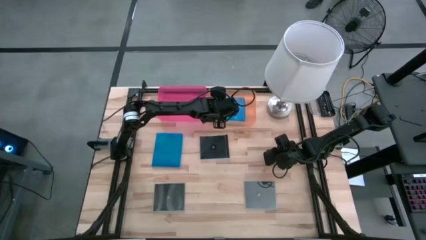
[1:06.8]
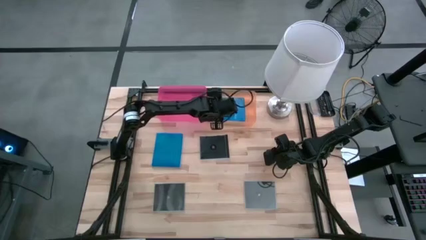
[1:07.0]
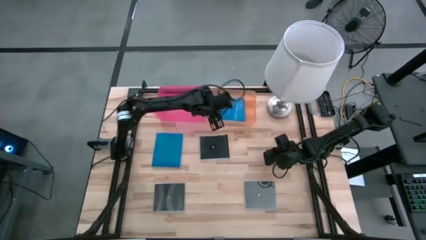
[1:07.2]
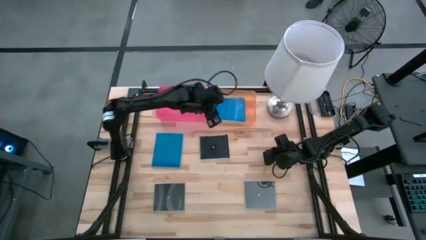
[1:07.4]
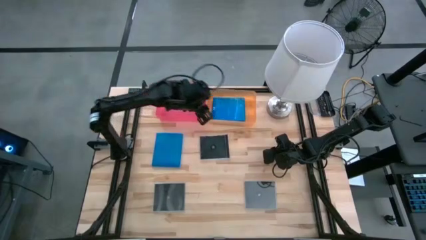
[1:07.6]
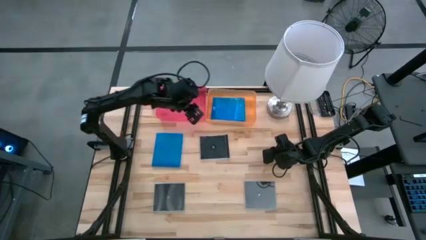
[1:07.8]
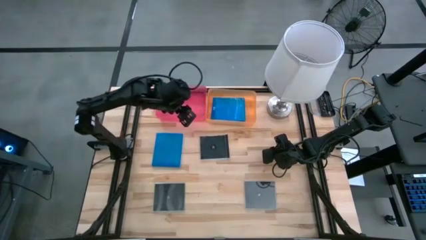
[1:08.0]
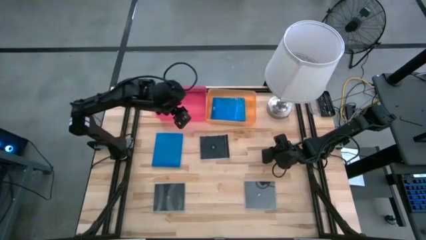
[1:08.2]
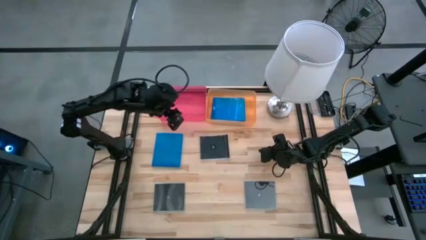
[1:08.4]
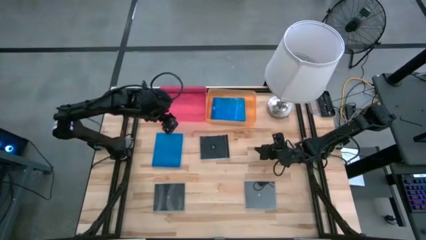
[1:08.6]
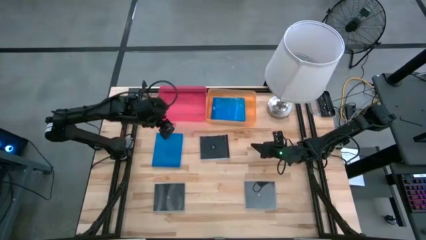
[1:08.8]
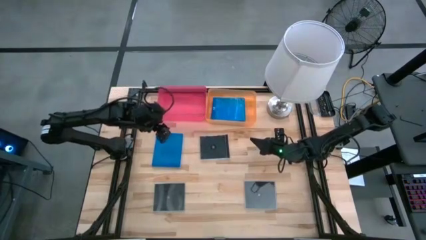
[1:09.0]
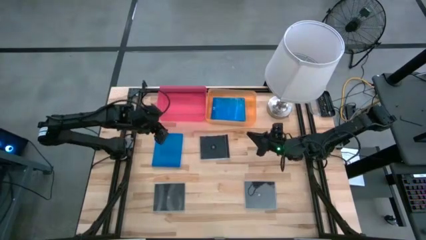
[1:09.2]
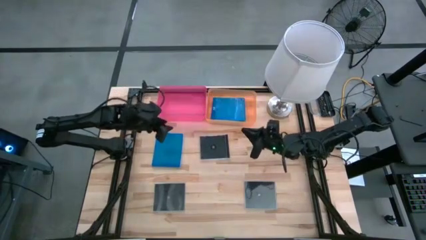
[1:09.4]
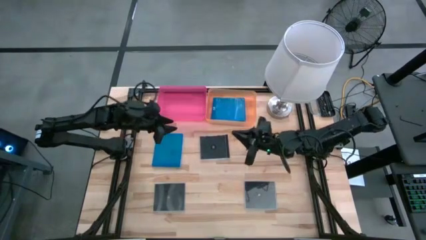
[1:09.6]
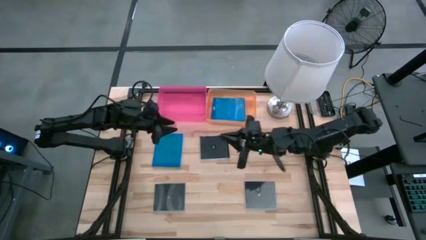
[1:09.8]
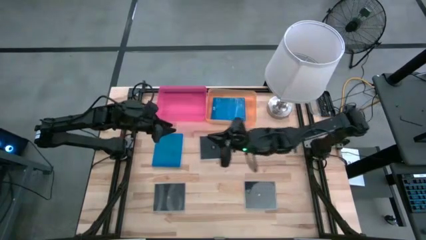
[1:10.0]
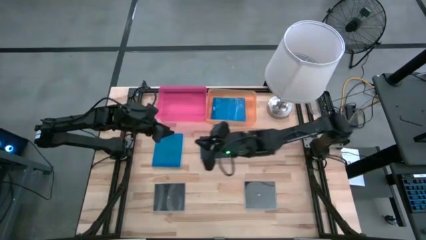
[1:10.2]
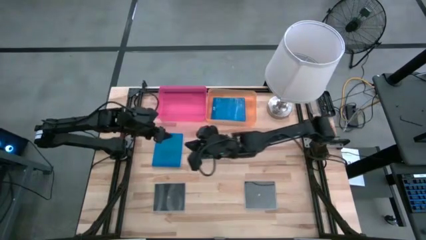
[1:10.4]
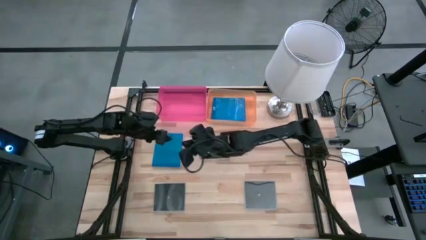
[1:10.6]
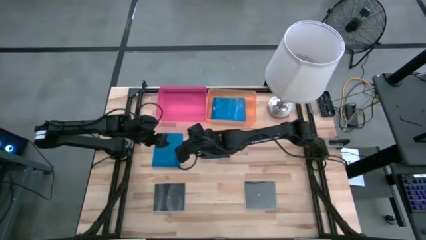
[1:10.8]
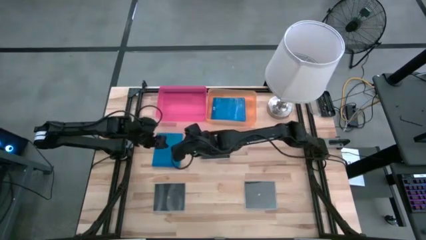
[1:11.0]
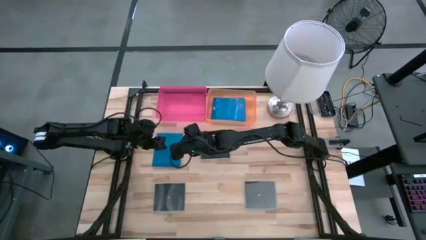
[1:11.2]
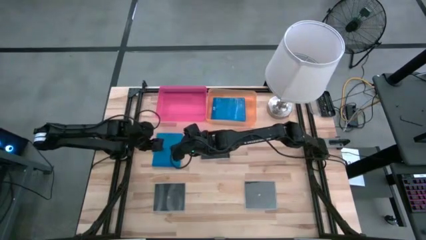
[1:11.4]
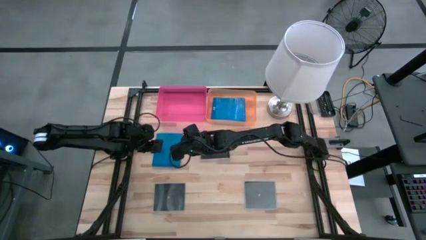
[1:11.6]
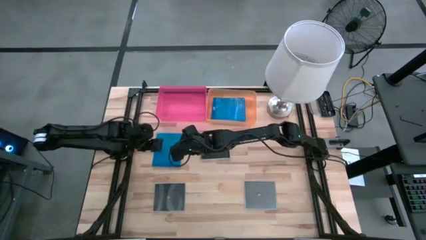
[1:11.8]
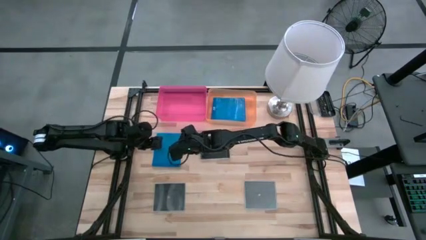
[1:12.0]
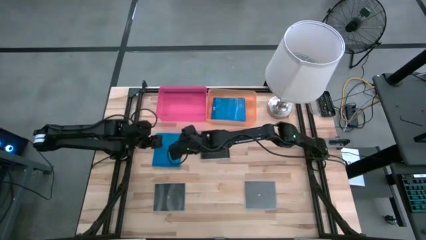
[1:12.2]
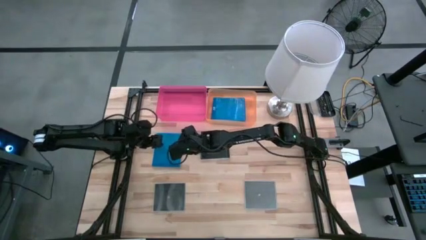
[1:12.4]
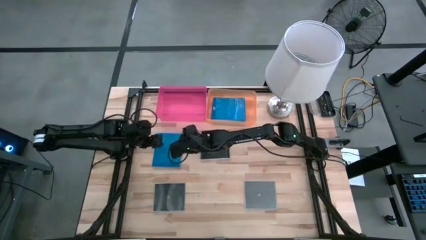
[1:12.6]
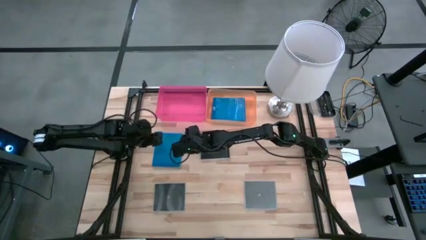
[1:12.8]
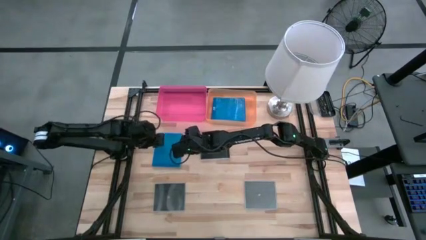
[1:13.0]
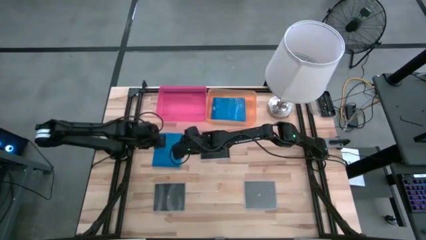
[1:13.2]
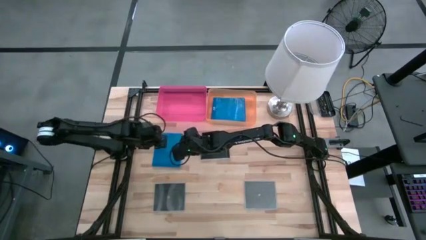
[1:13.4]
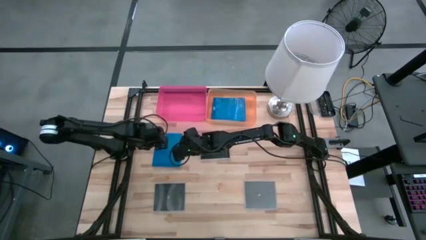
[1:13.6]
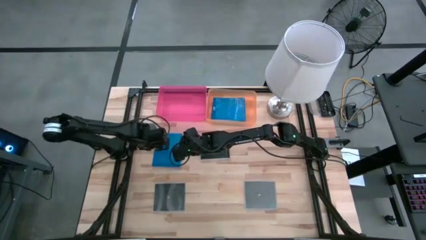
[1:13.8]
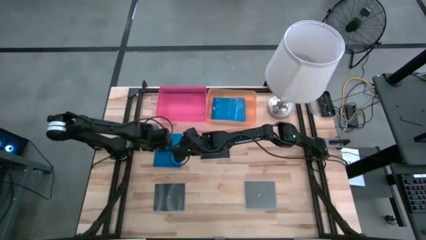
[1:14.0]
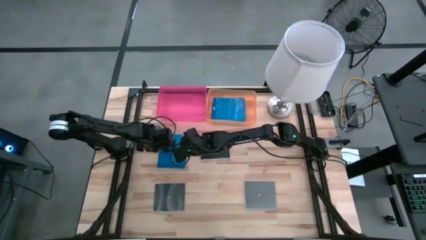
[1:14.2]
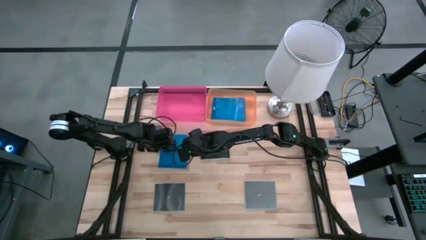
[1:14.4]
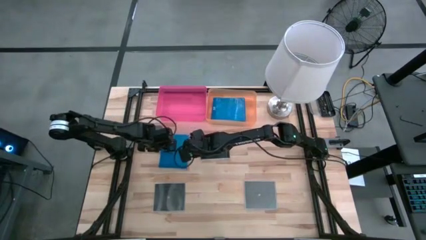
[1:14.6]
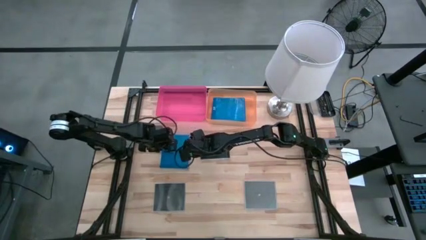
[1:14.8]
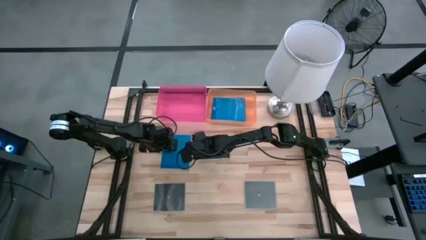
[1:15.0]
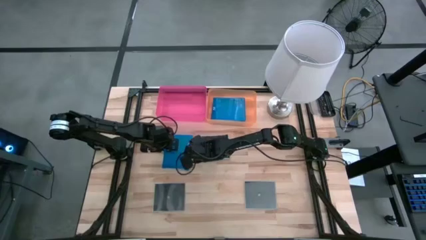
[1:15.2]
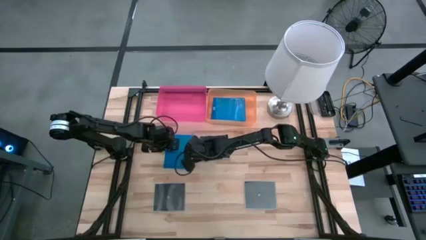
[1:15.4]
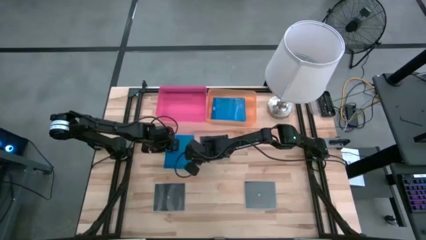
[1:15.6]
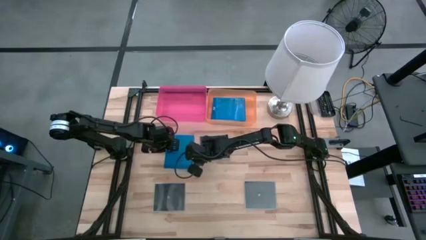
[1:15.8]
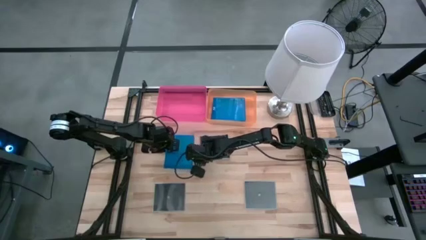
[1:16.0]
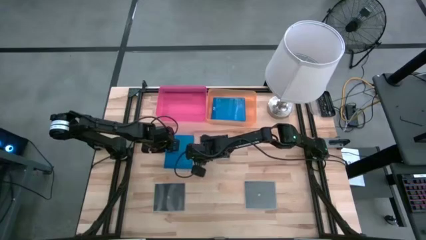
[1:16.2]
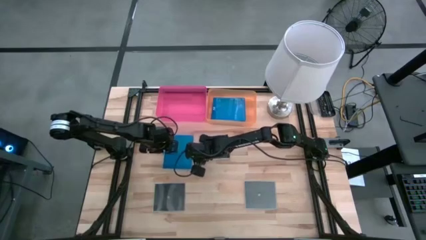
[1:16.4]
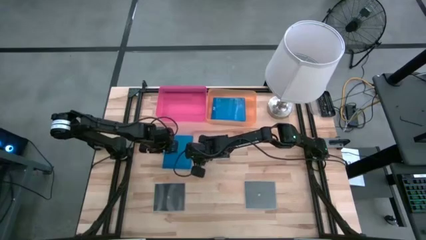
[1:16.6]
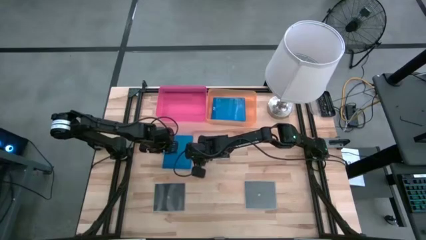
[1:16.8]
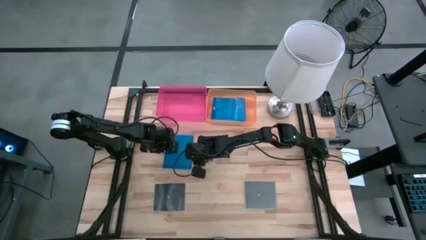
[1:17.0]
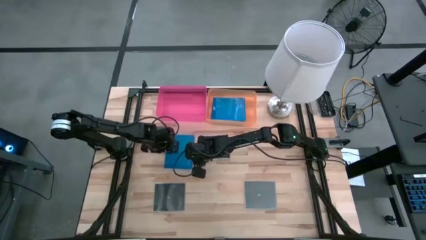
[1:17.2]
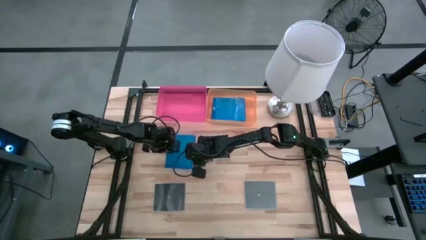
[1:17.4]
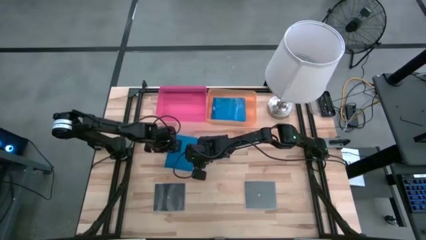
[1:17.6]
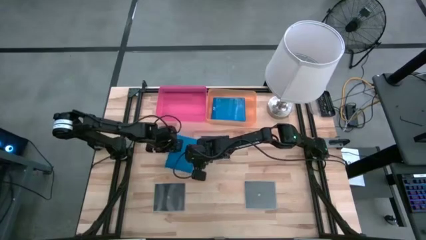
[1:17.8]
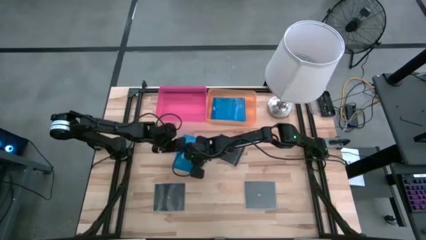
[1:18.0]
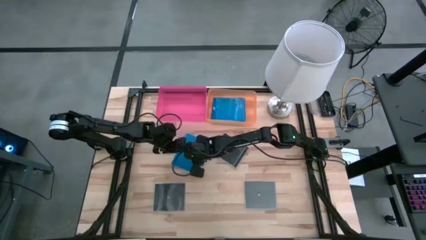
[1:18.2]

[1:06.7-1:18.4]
Task: Pick & place jewel cases by type
Put the blue CD case into the orange bin
